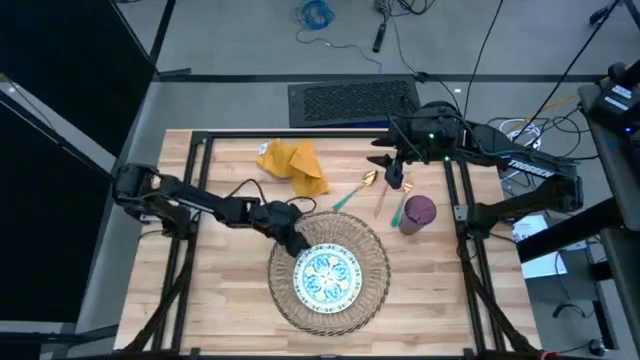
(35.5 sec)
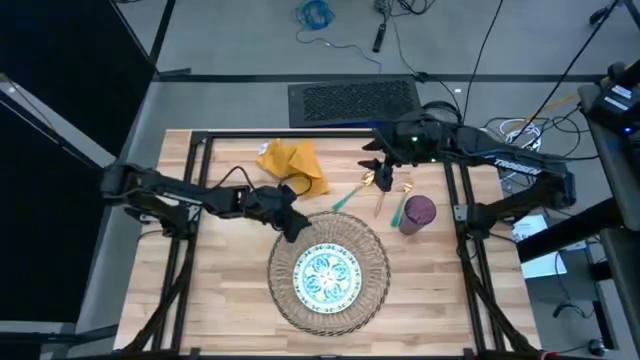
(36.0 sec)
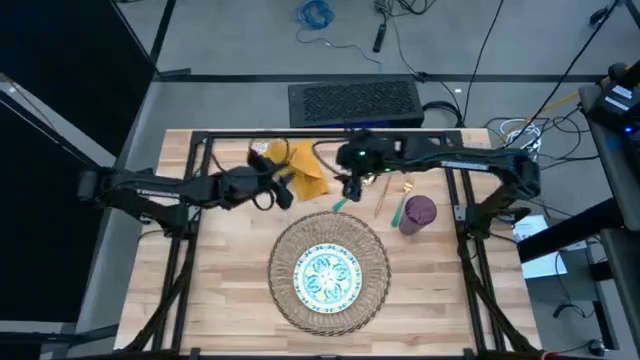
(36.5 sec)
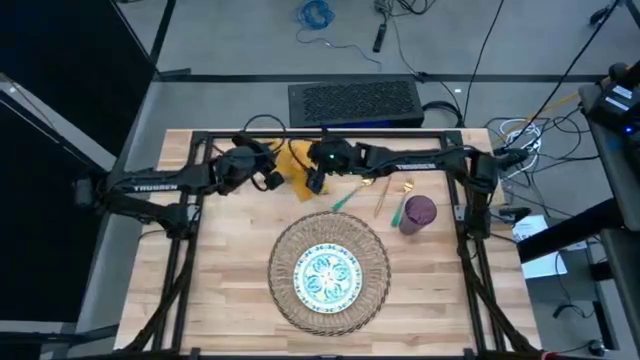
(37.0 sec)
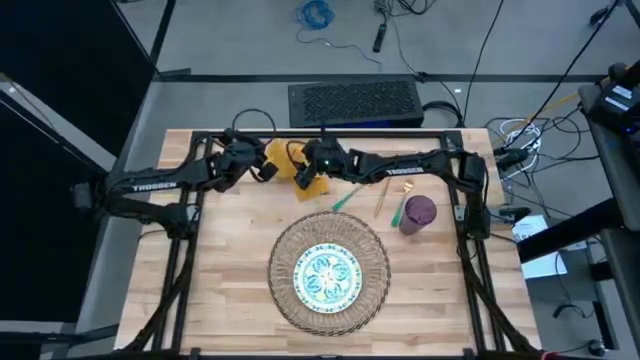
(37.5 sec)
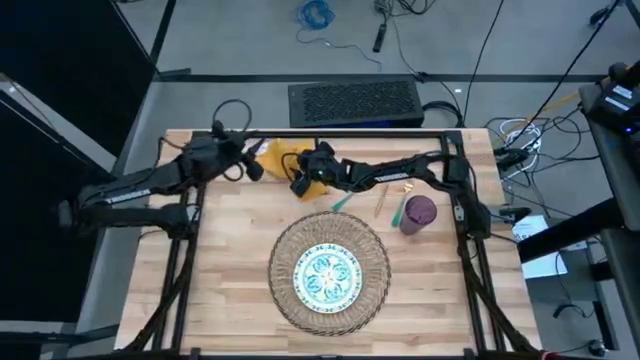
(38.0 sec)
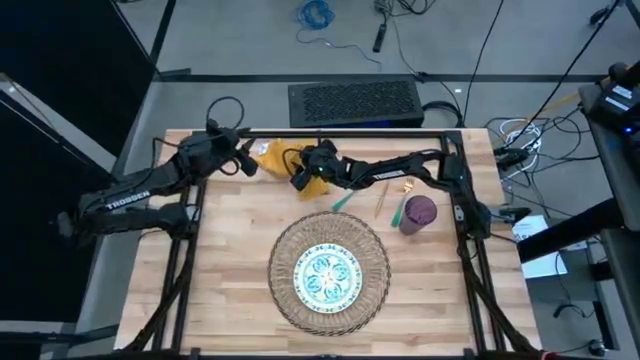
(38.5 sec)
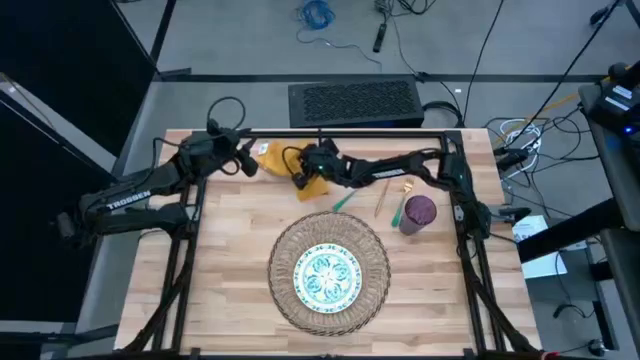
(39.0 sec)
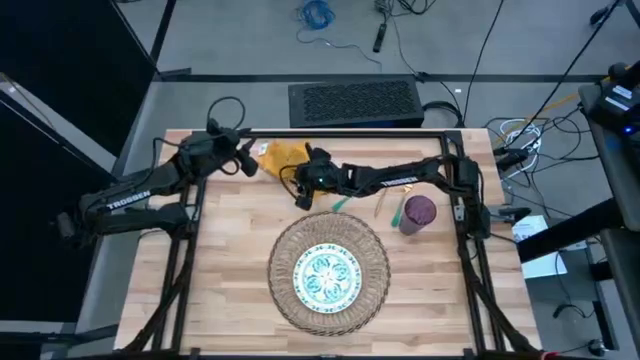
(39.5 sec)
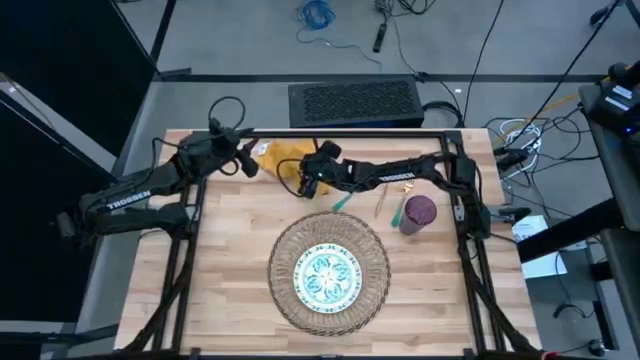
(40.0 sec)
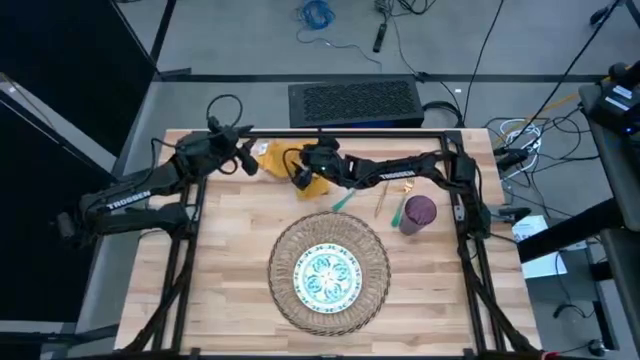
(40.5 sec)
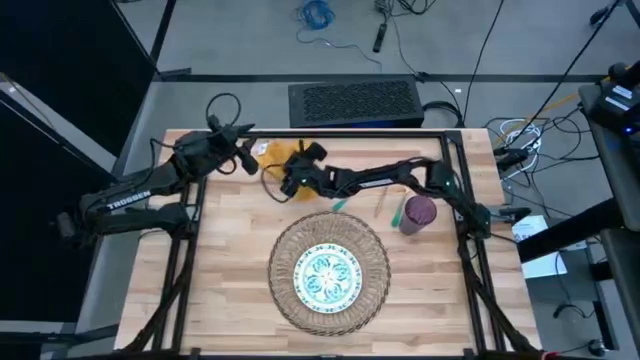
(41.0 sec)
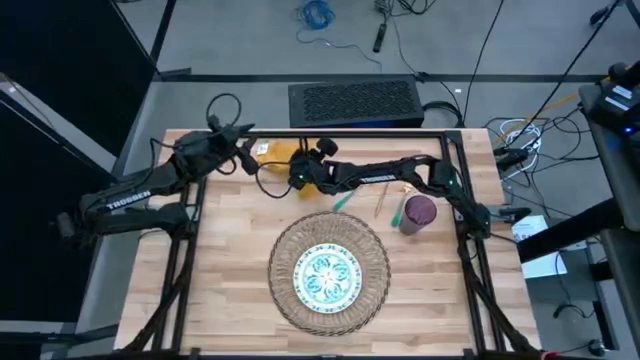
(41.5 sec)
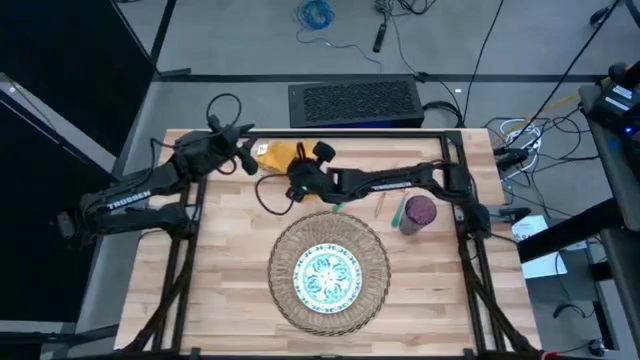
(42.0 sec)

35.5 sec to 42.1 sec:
Task: Set table place
Fold the yellow table napkin
